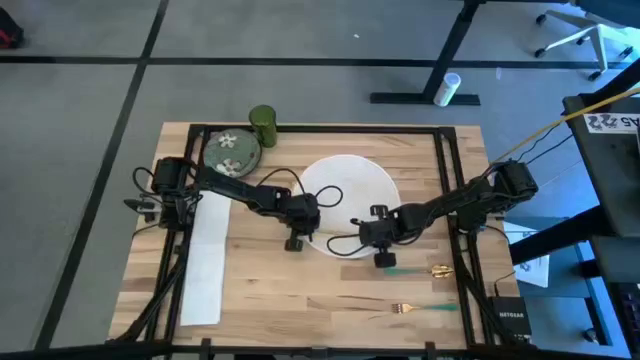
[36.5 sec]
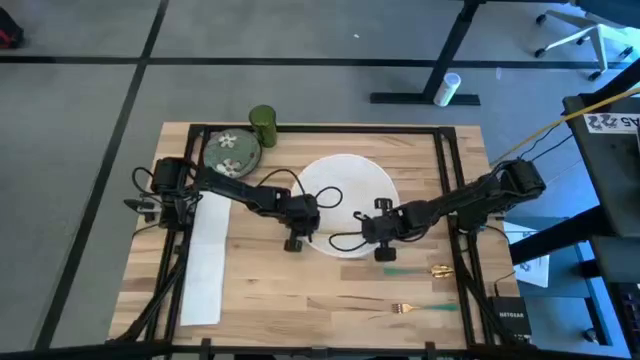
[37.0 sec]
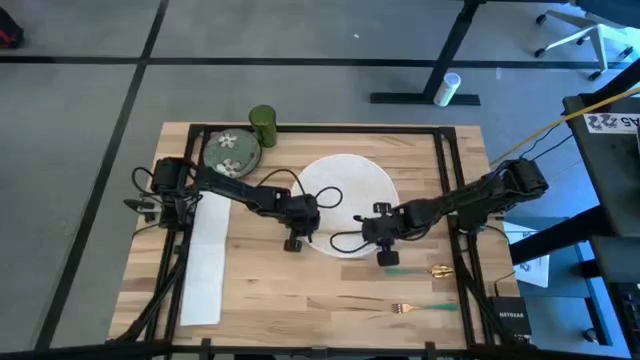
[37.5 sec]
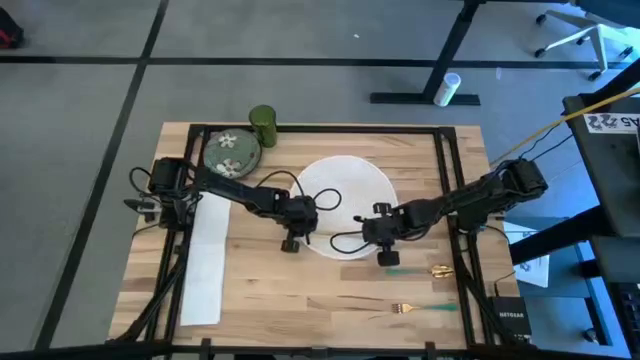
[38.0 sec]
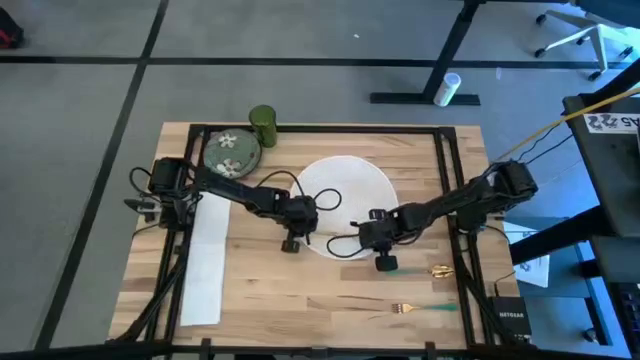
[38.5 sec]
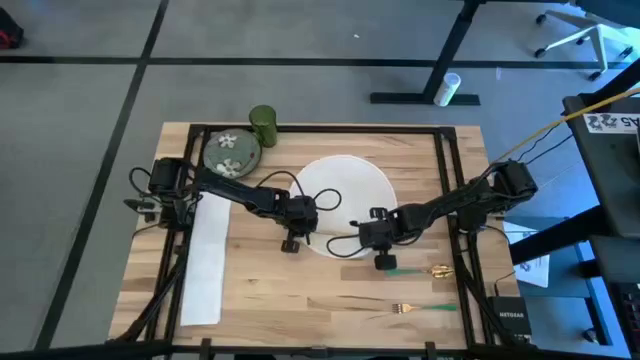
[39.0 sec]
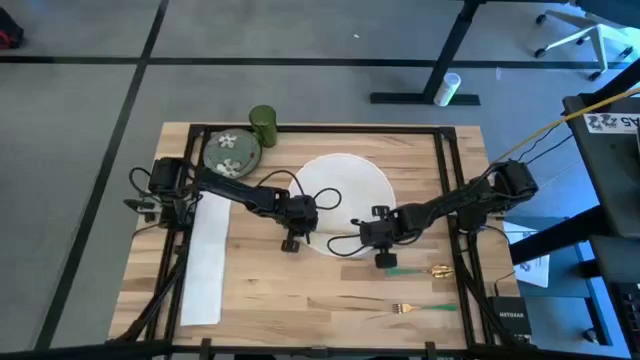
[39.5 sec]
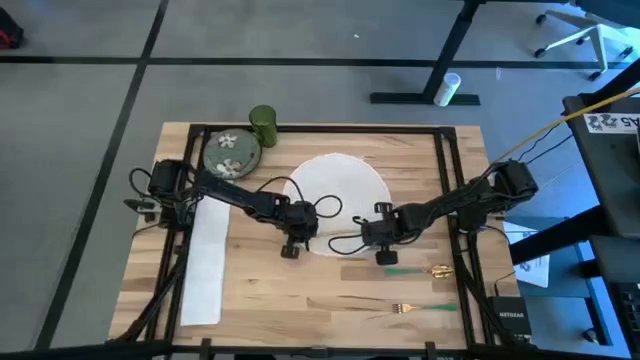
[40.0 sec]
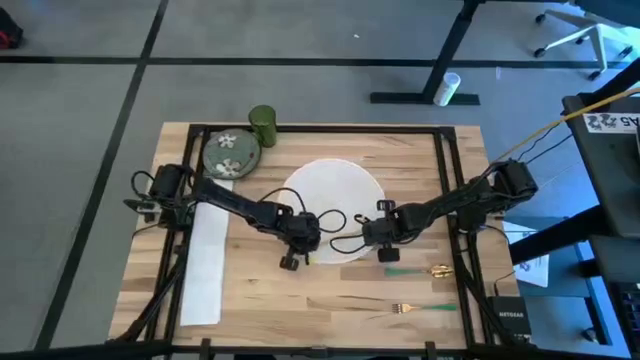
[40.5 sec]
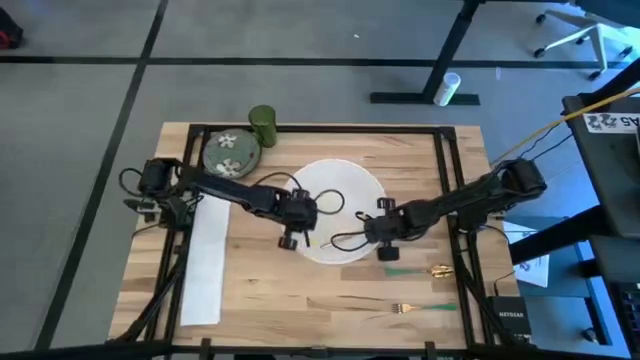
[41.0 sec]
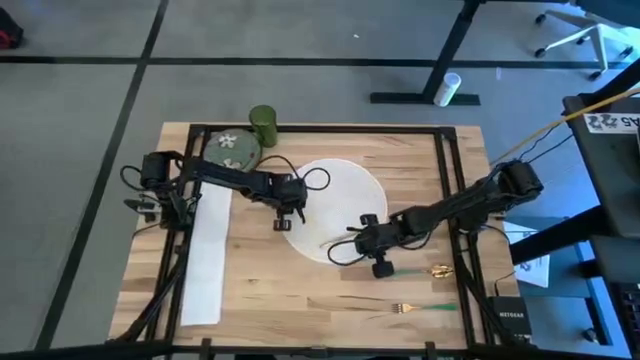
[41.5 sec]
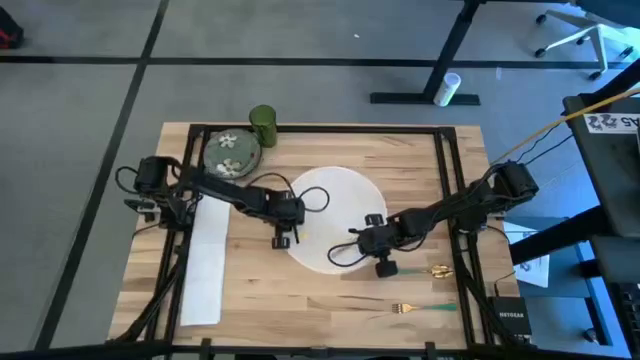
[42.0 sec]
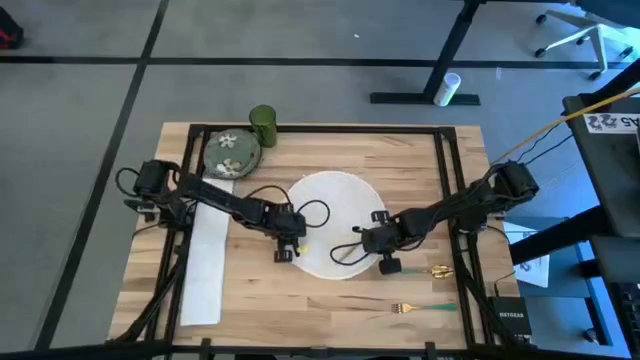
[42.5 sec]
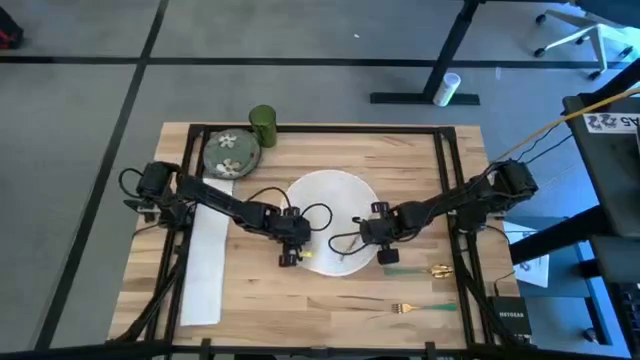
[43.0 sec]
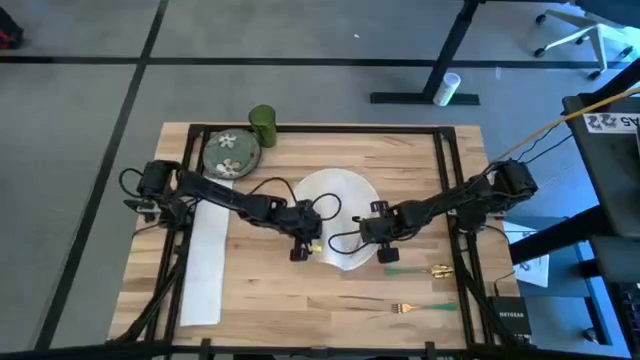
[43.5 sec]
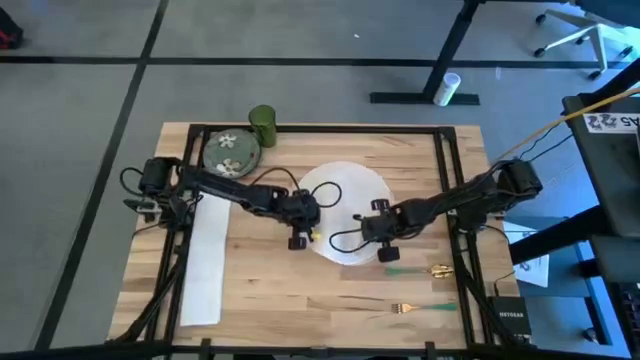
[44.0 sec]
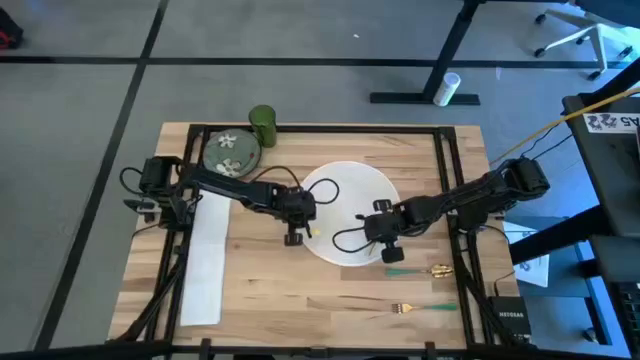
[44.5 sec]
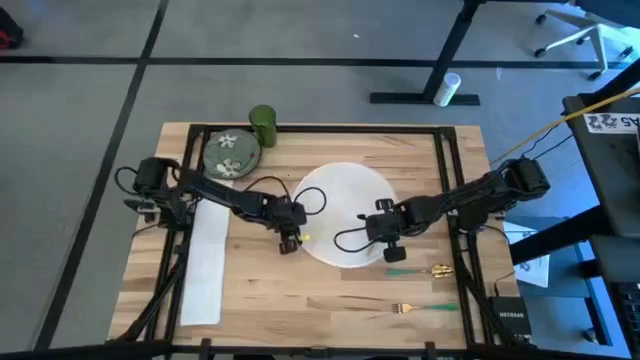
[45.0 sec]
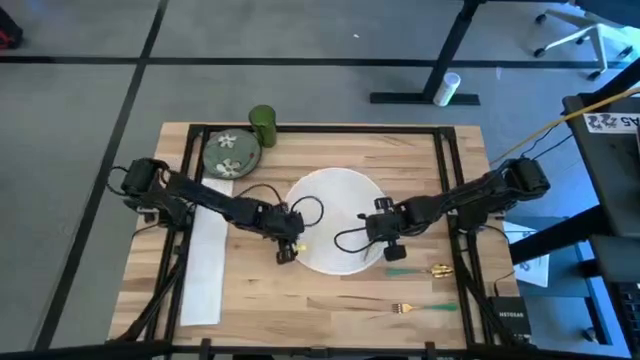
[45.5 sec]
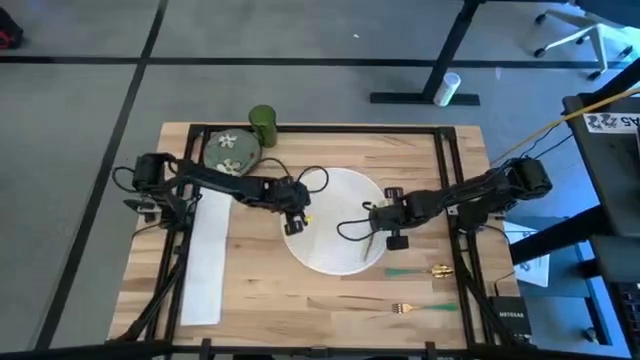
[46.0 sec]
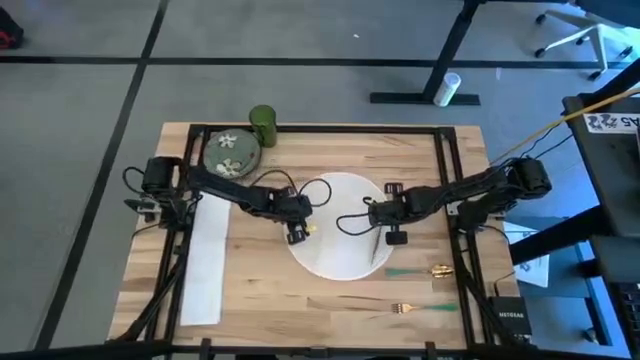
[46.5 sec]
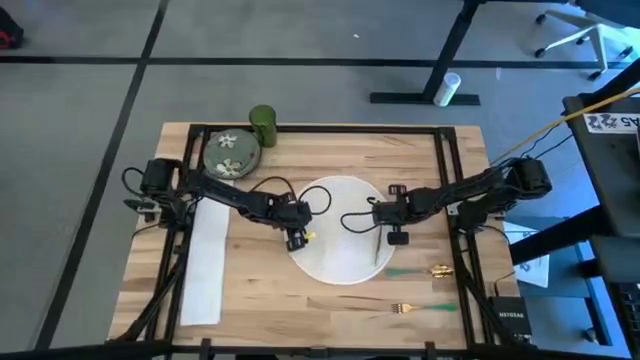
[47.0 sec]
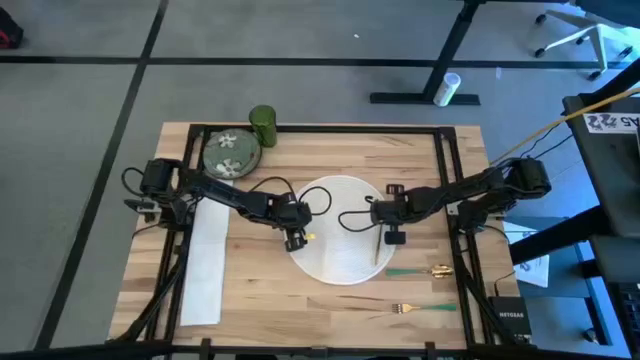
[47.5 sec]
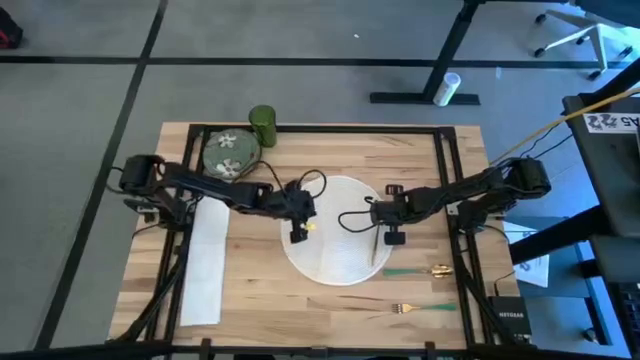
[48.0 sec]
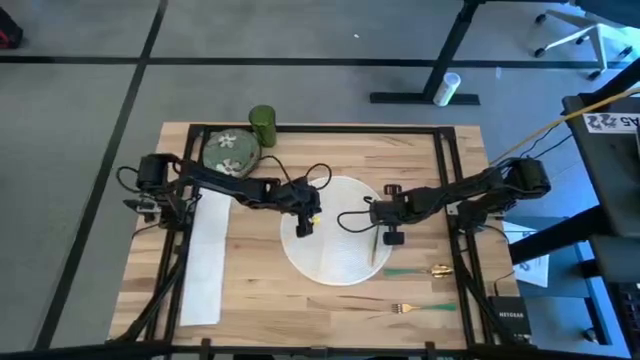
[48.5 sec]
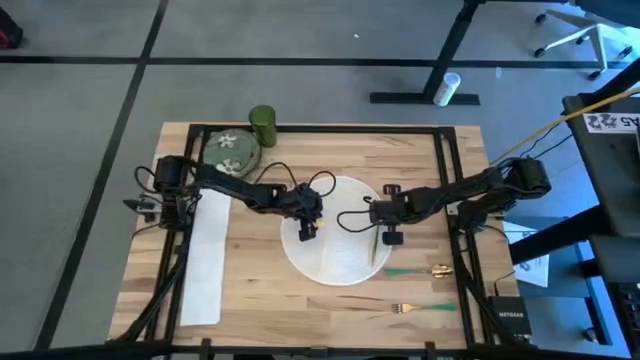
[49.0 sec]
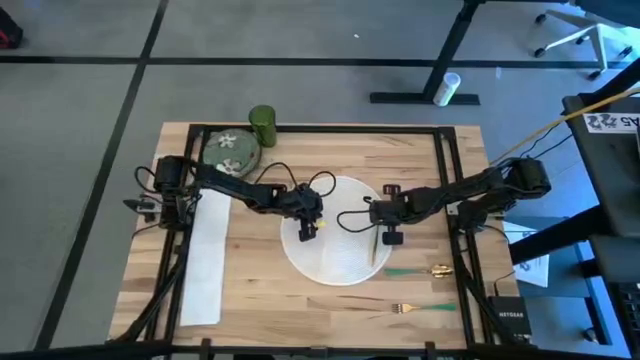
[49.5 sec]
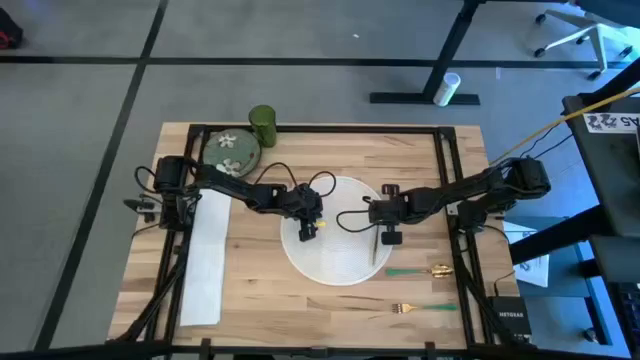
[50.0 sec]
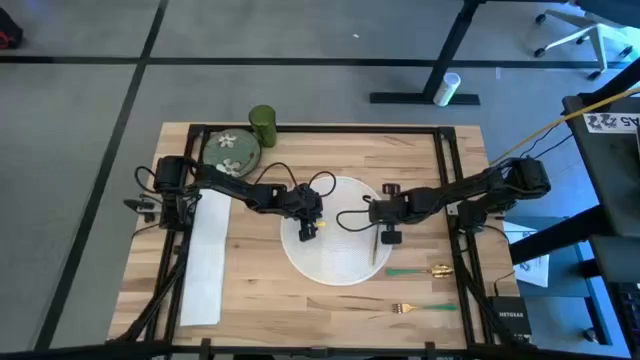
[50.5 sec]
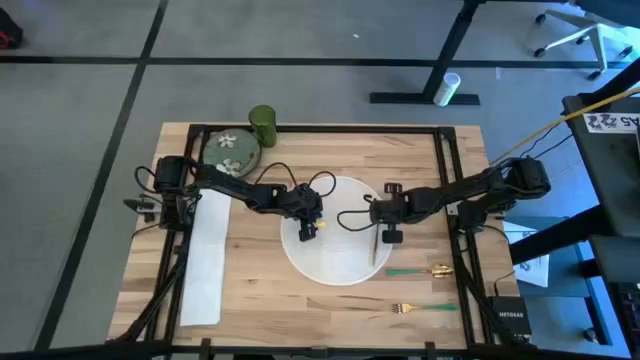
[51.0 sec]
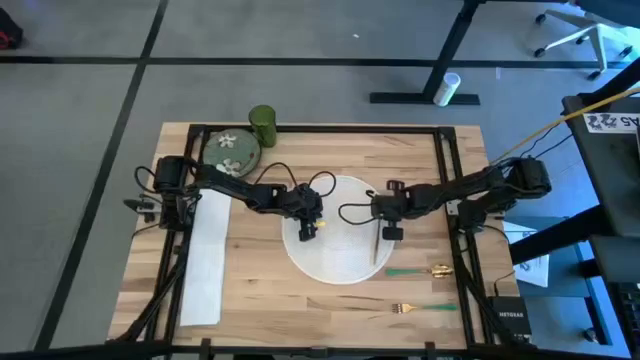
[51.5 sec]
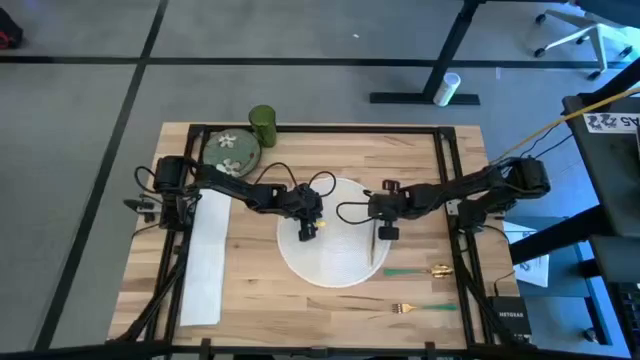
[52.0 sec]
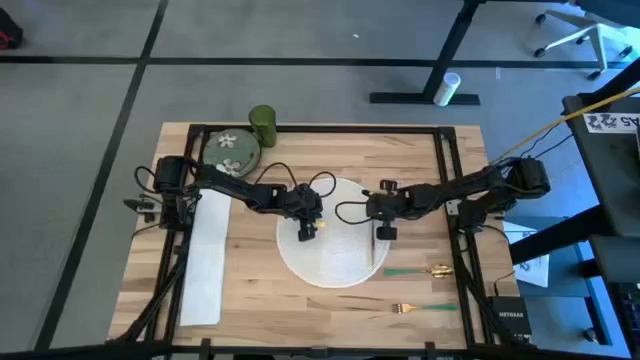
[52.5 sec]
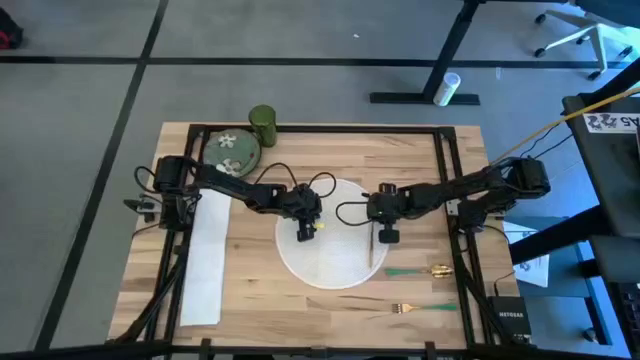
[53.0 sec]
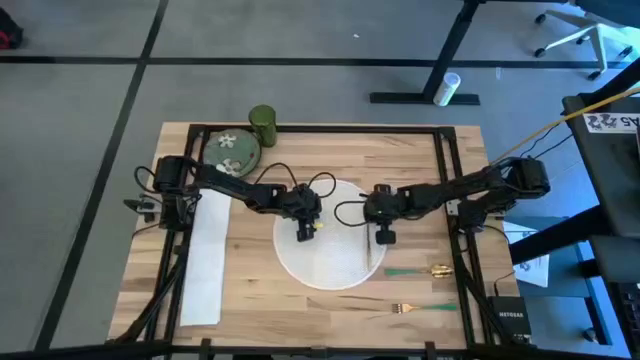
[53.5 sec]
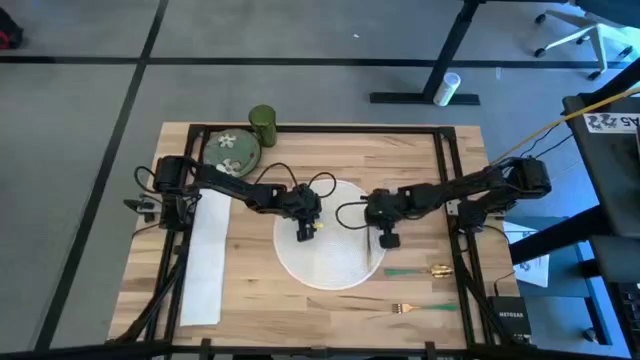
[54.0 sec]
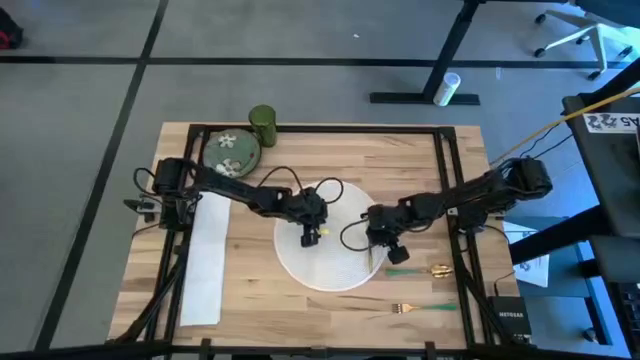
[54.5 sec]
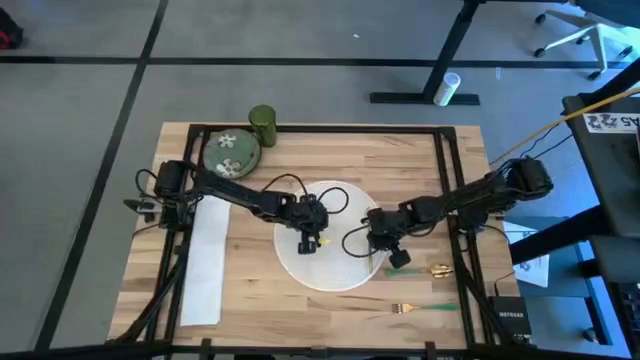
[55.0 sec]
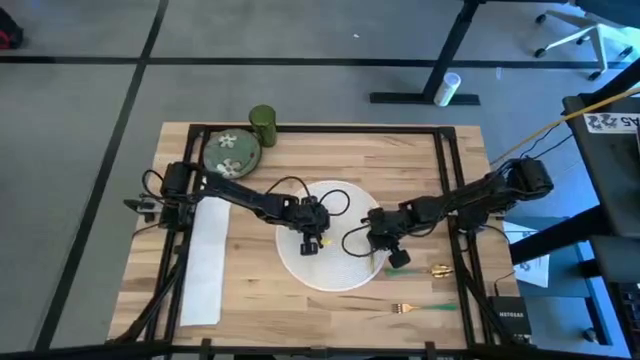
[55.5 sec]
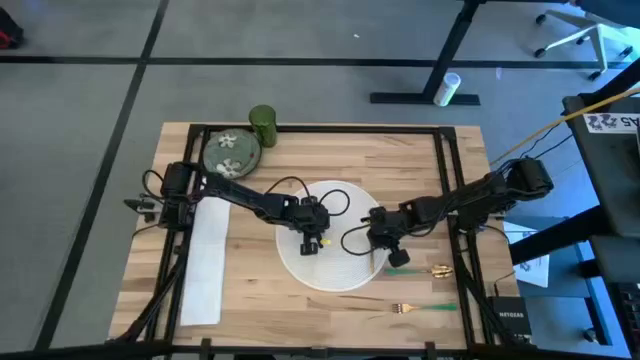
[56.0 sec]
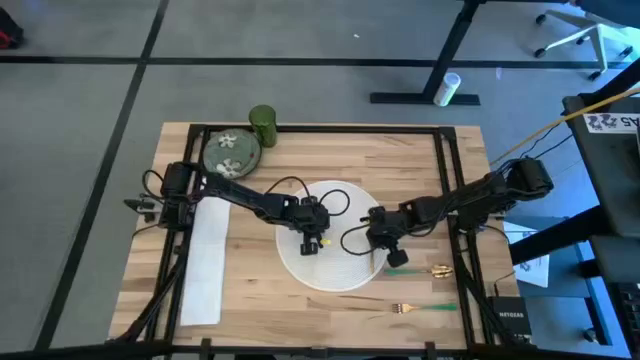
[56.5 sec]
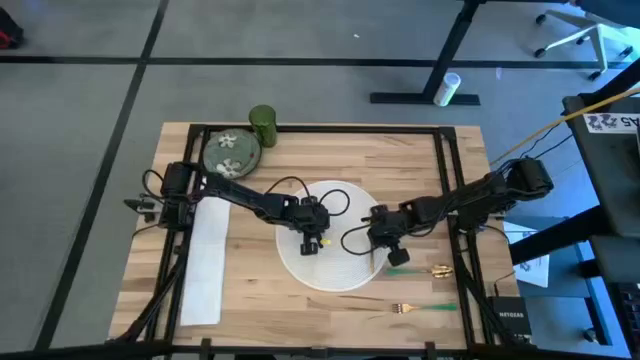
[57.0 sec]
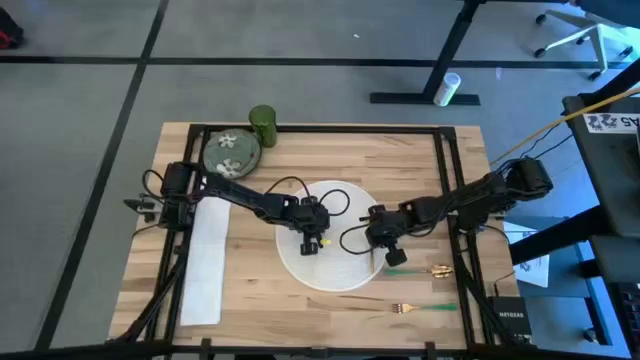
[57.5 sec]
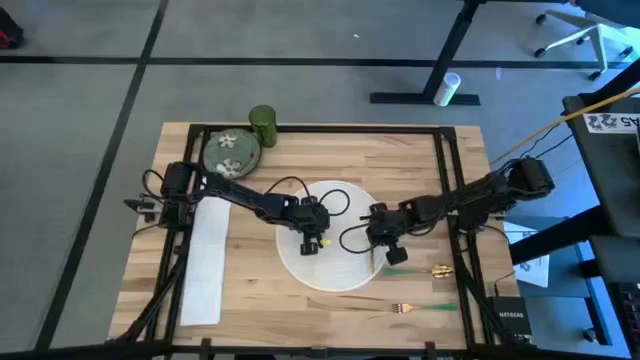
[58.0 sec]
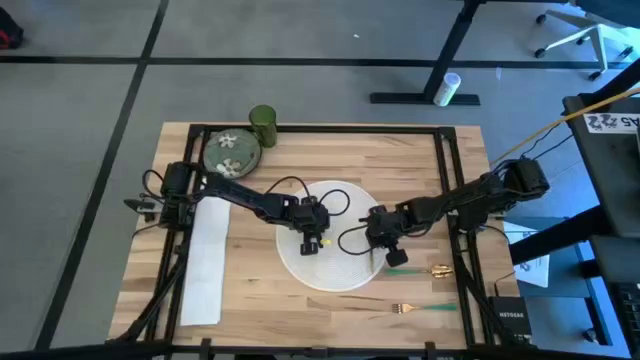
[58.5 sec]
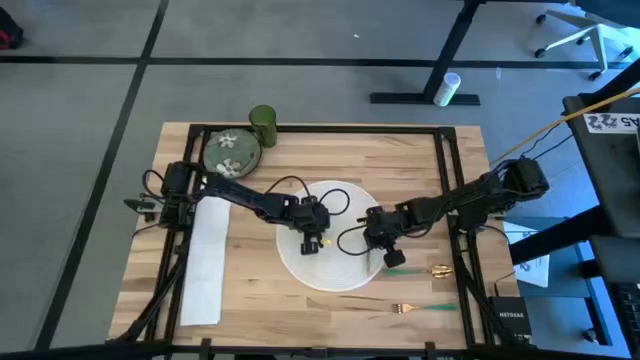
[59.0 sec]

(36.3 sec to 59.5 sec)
Task: Set table place
Adjust the white table mat on the table
